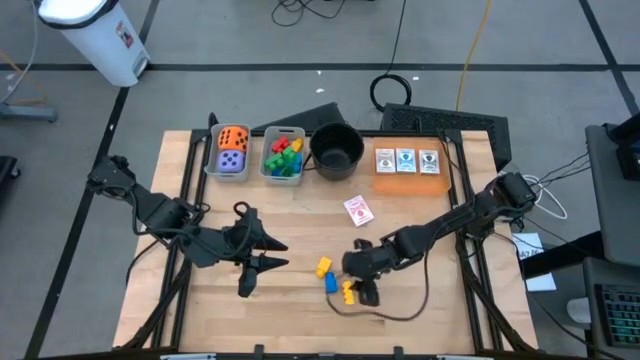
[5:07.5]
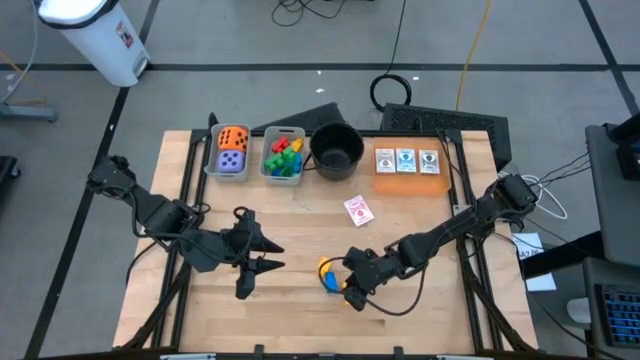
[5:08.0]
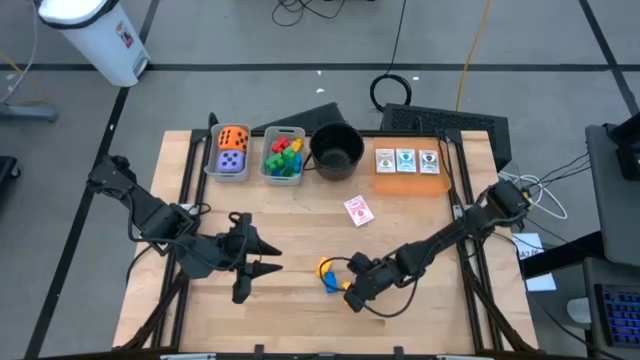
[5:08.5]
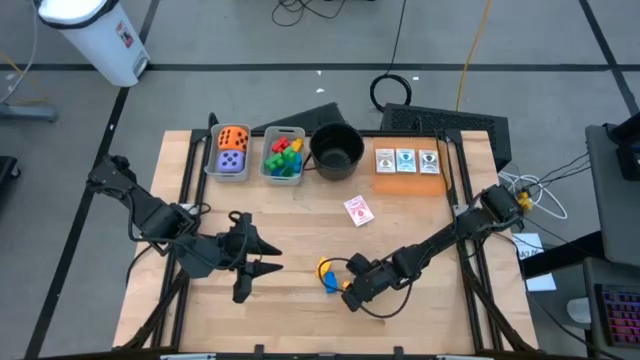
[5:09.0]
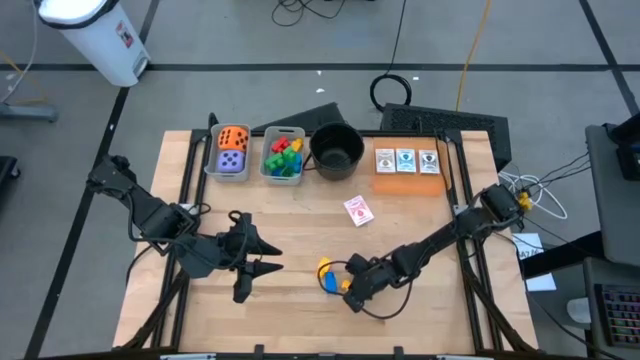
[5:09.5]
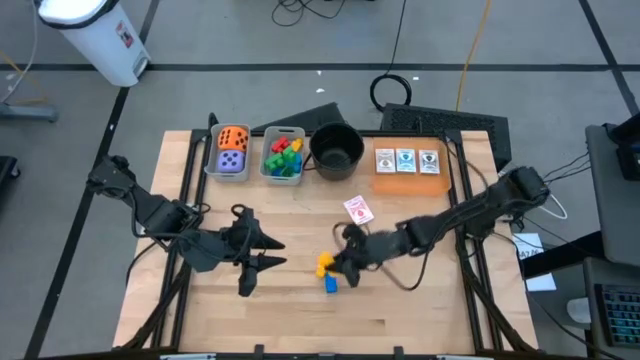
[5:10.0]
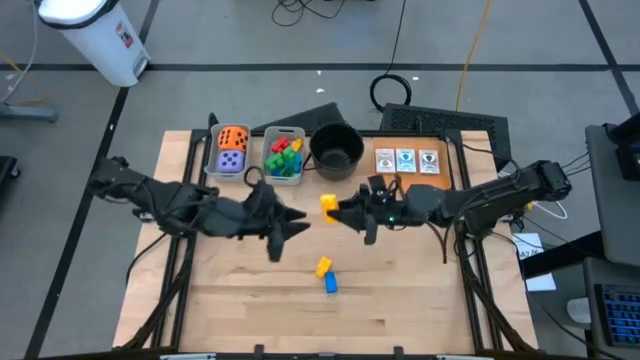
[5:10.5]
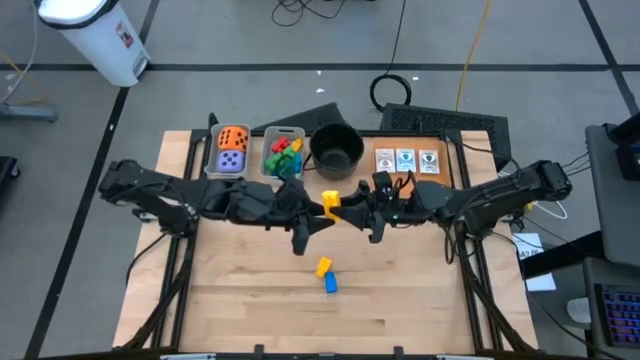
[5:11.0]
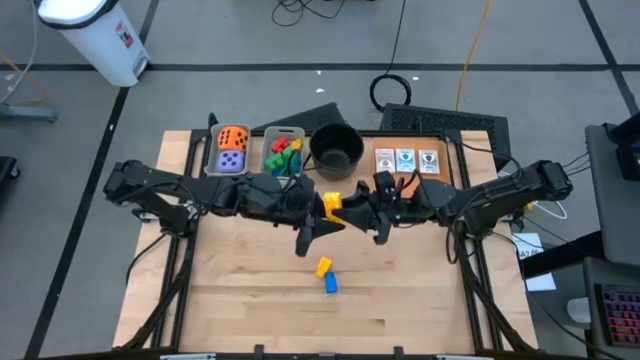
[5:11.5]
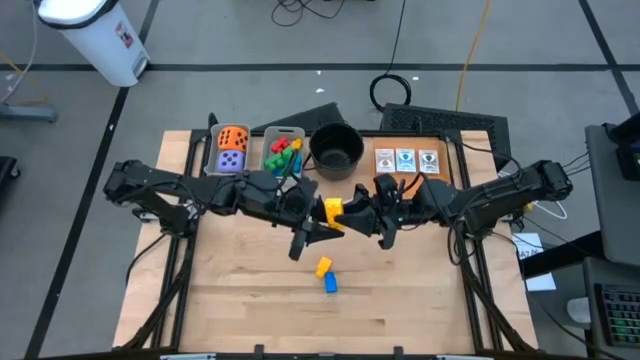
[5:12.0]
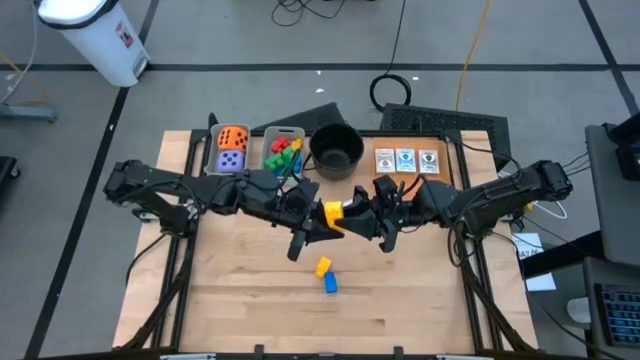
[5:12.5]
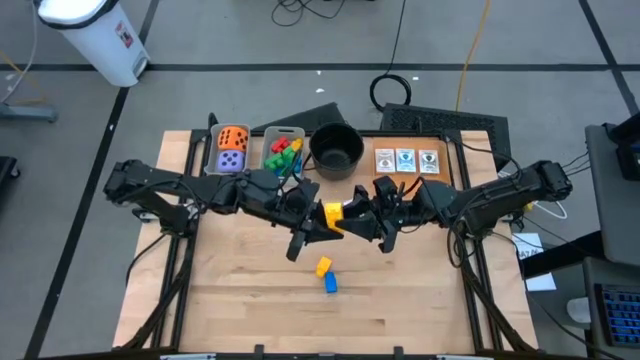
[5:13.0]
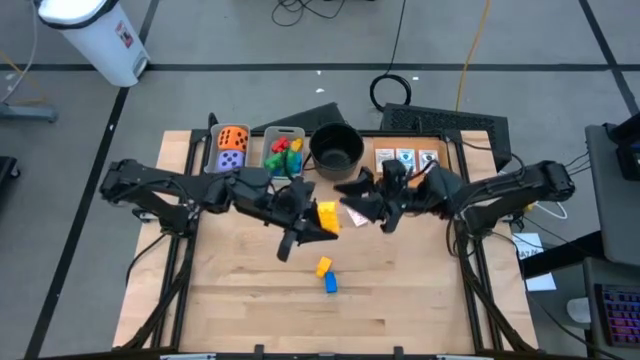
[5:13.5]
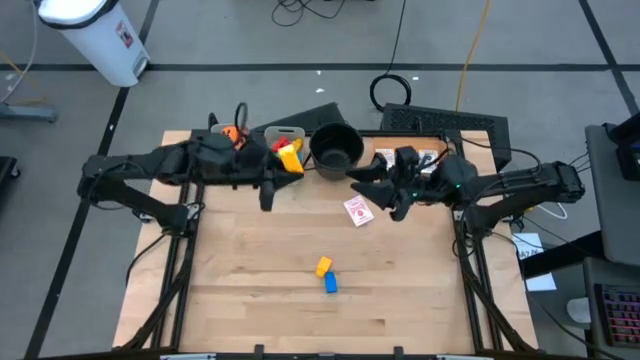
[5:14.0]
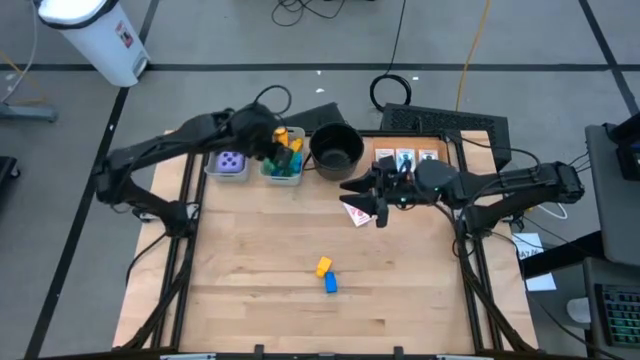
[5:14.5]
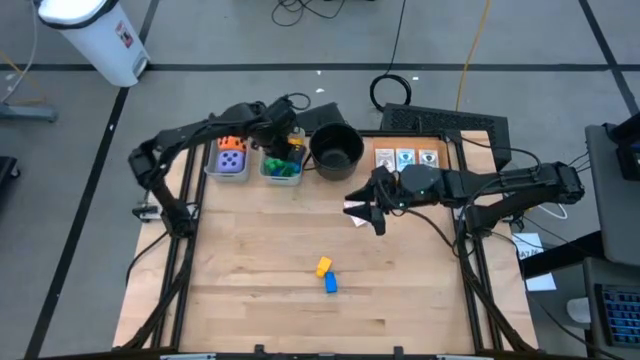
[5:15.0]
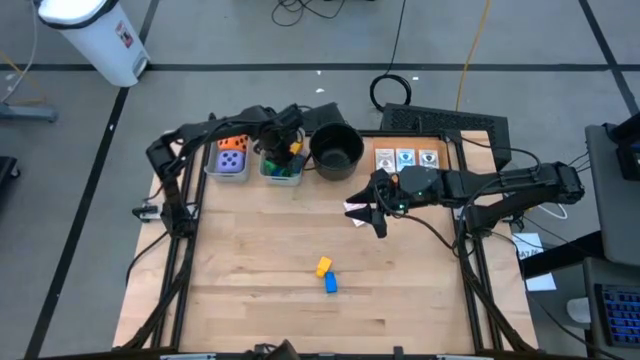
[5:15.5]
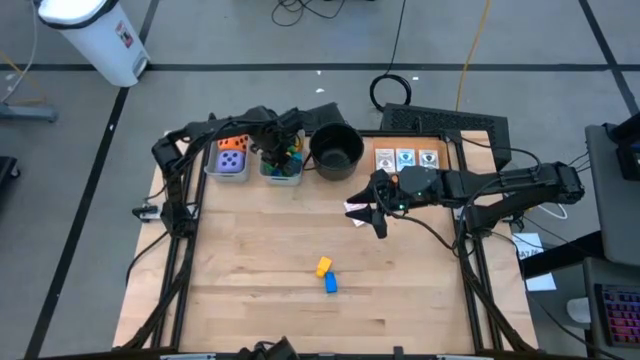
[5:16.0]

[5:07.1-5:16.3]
Task: Pick & Place Toys
Put the yellow game piece into the right gray bin

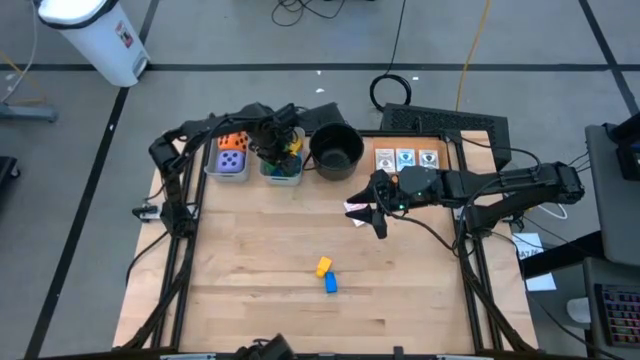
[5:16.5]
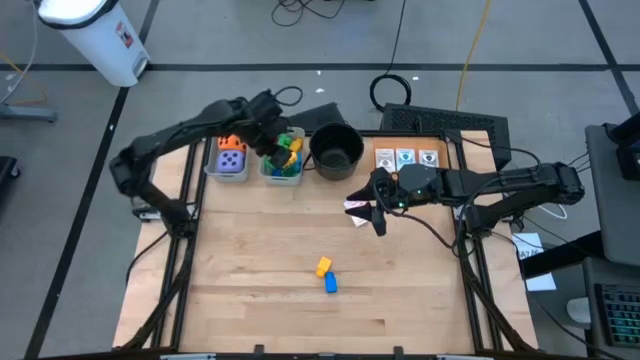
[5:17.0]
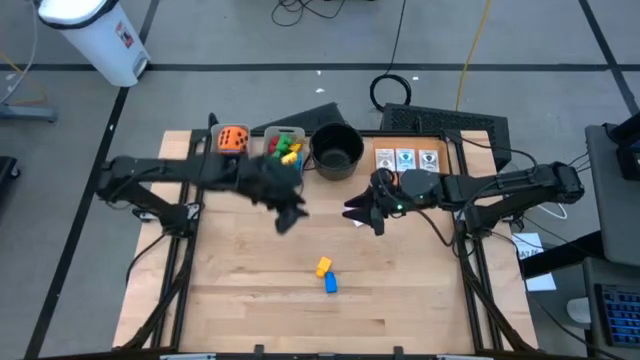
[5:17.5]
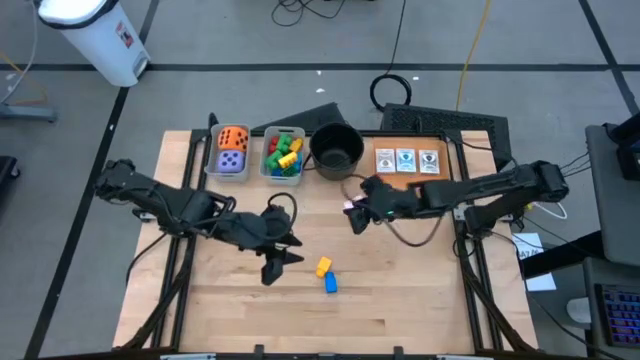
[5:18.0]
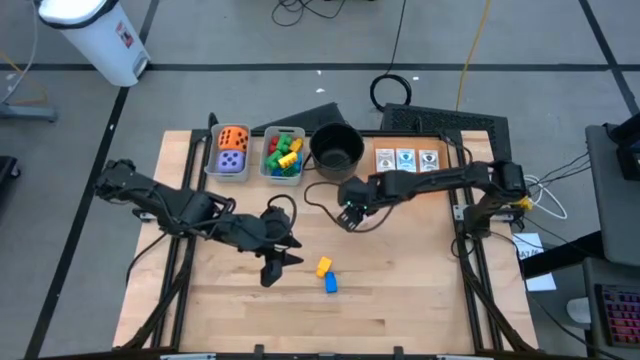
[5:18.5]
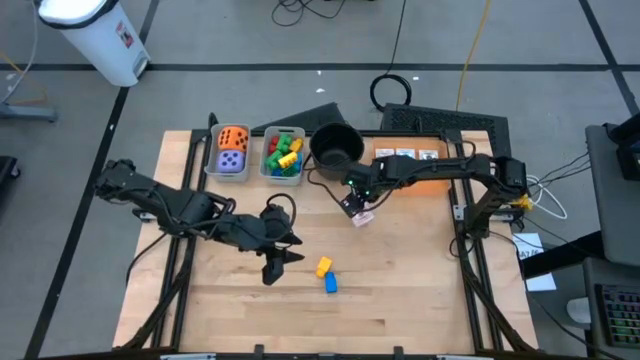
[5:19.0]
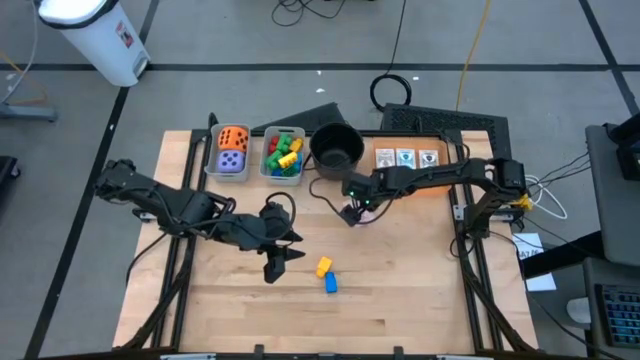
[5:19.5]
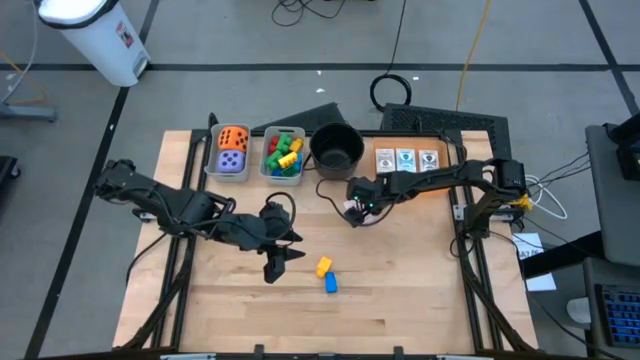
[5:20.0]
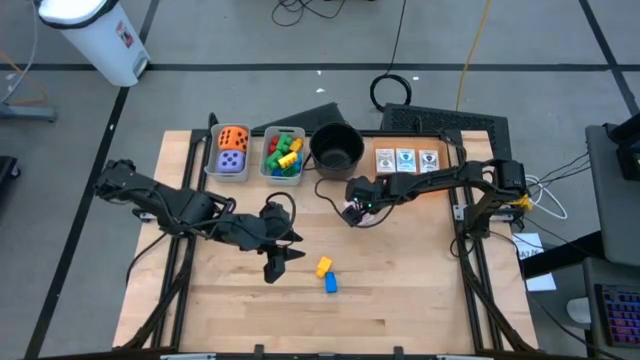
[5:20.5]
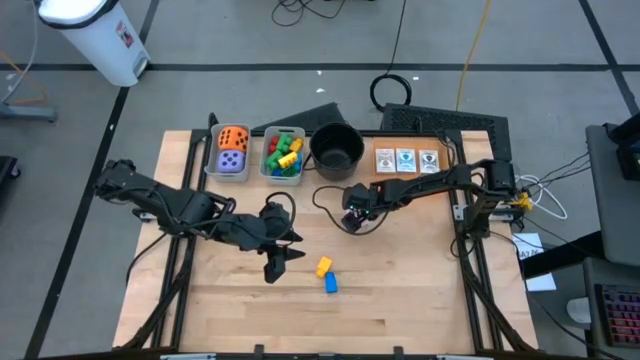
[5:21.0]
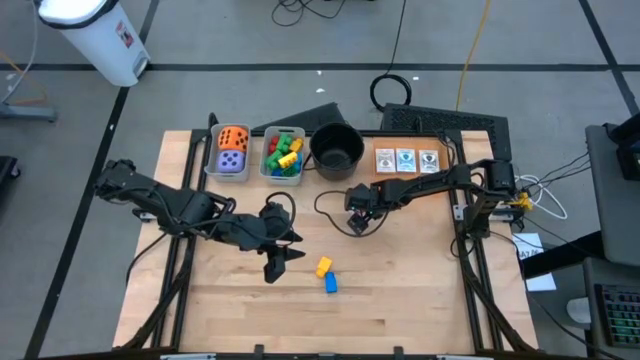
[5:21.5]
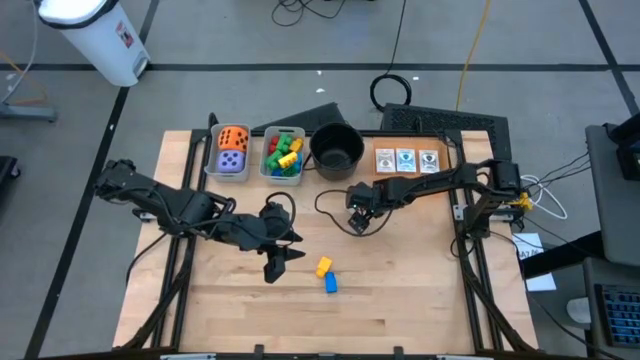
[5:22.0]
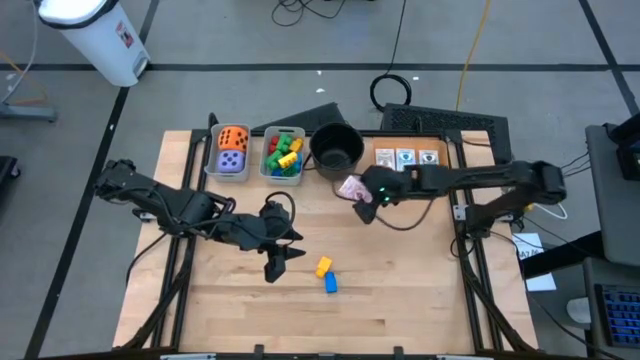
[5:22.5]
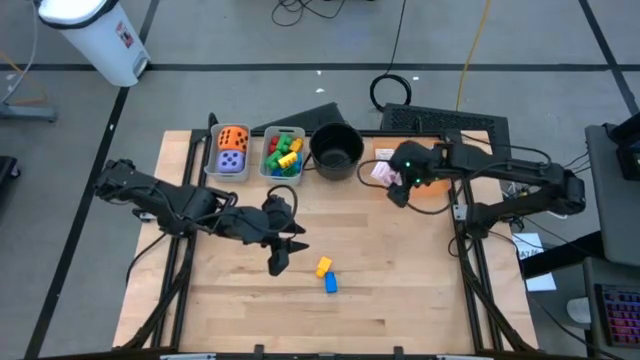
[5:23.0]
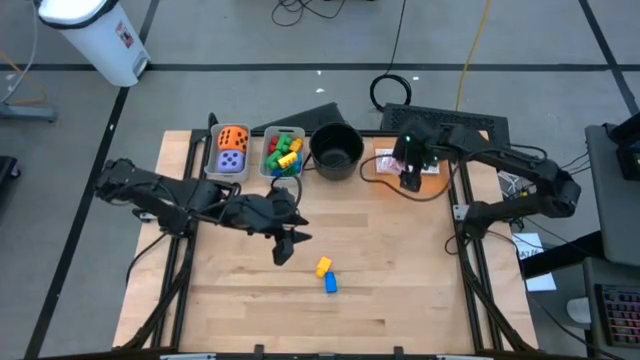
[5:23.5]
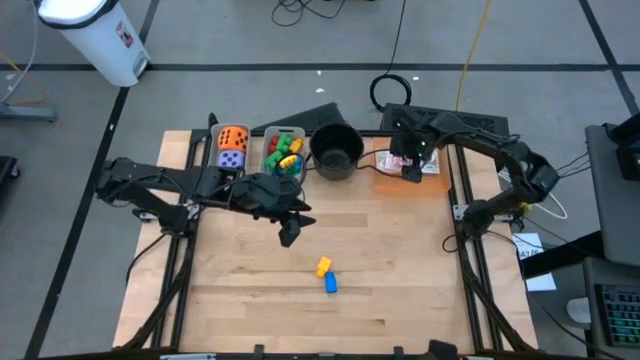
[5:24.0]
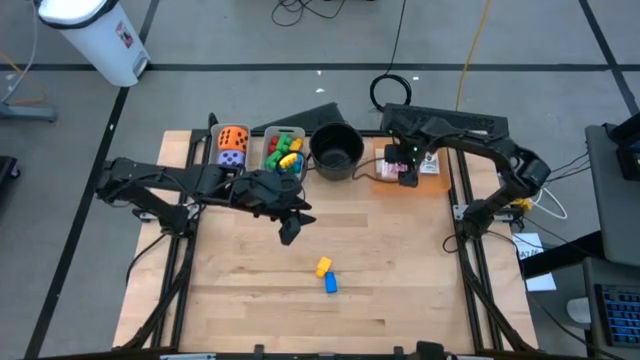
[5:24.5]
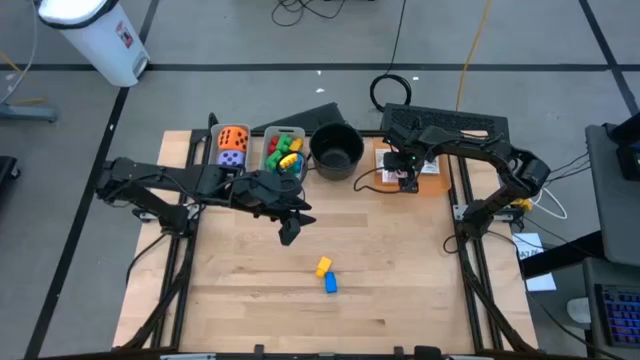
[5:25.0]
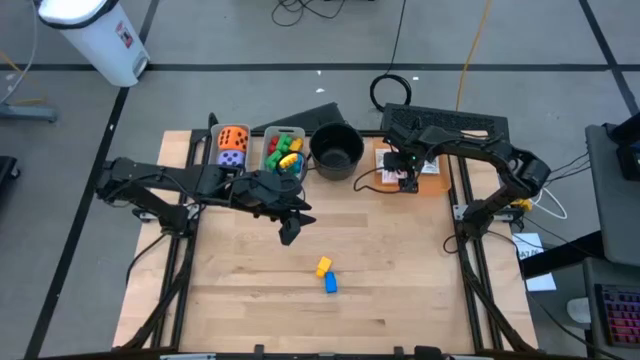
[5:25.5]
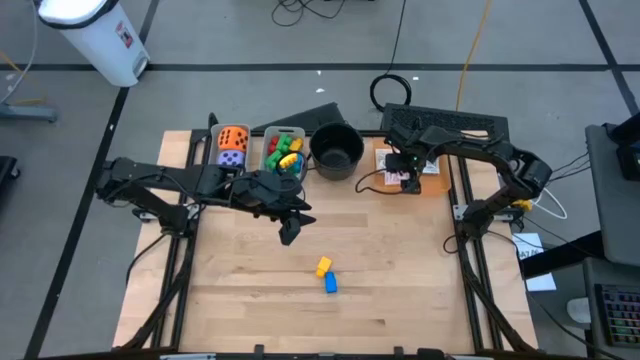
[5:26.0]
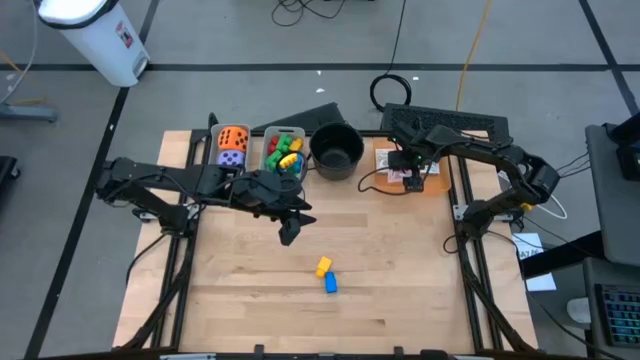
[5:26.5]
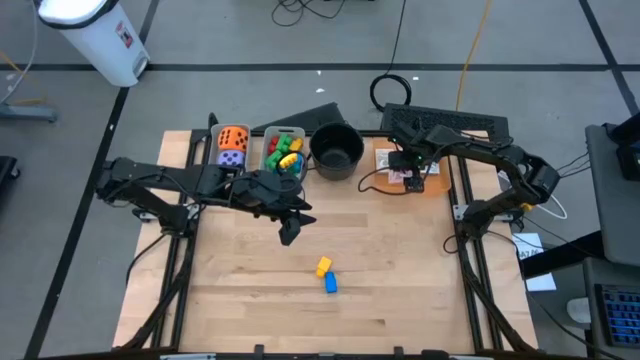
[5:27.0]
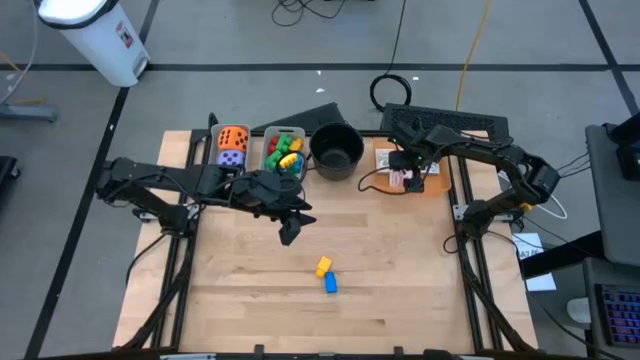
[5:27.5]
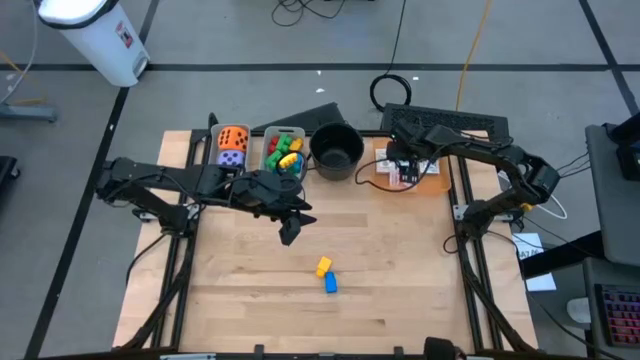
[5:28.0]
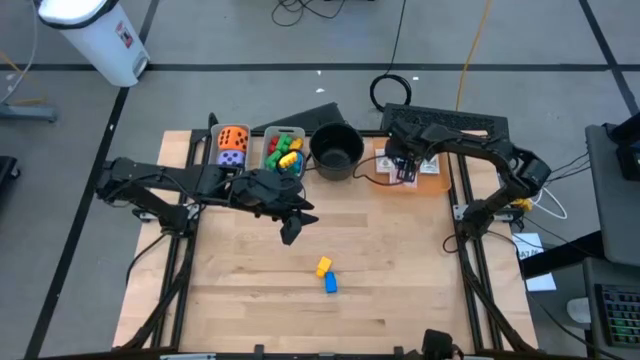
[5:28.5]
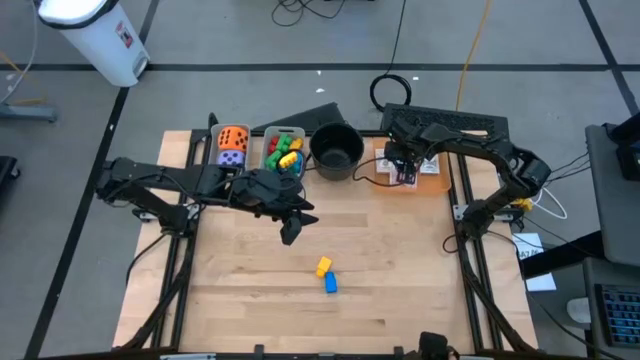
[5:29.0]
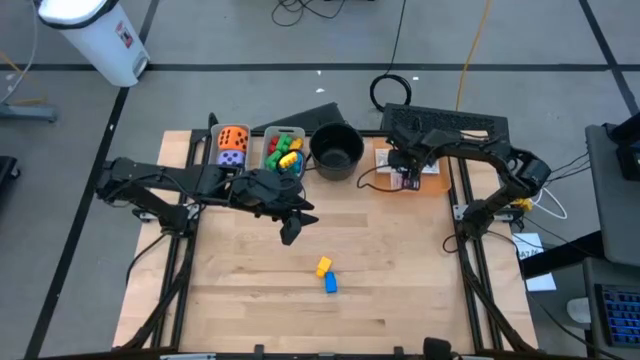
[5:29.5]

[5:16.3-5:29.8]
Put the red deck of cards into the orange bin
